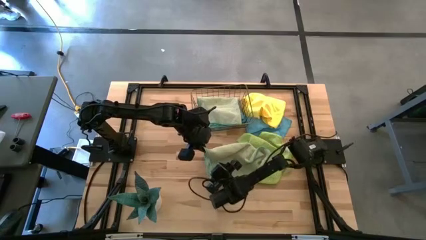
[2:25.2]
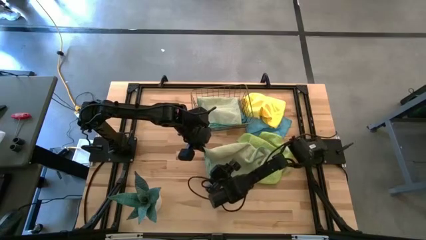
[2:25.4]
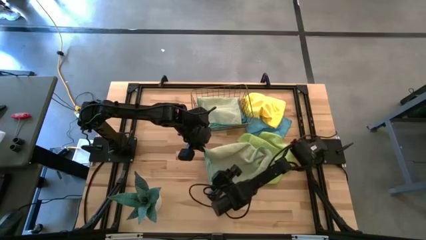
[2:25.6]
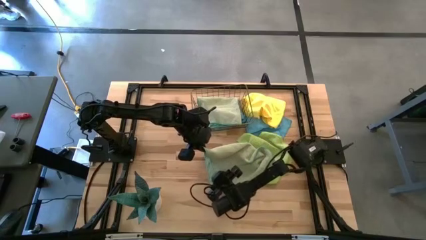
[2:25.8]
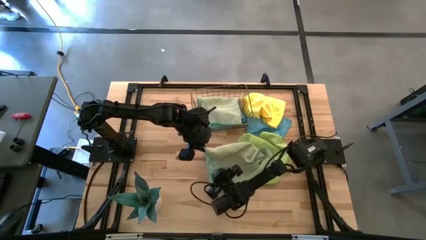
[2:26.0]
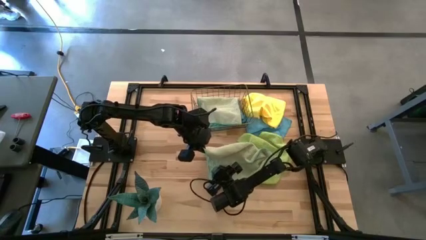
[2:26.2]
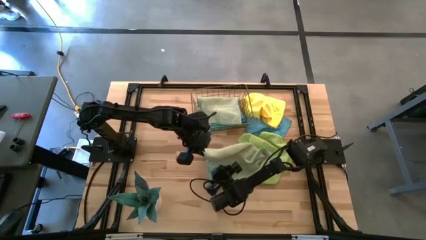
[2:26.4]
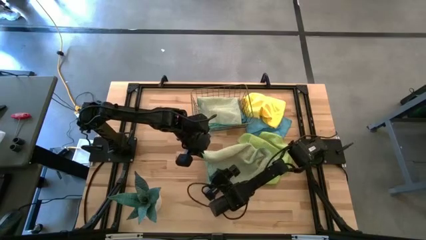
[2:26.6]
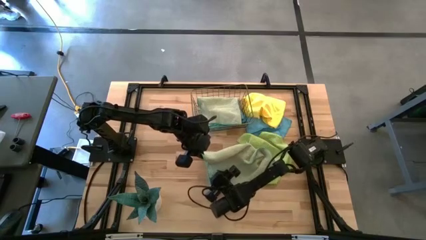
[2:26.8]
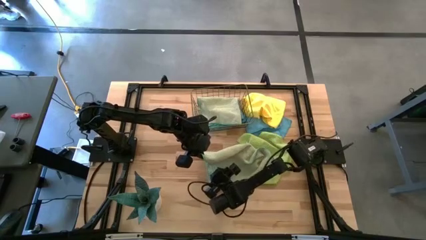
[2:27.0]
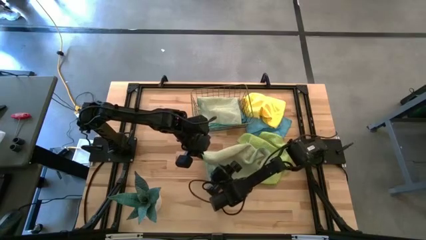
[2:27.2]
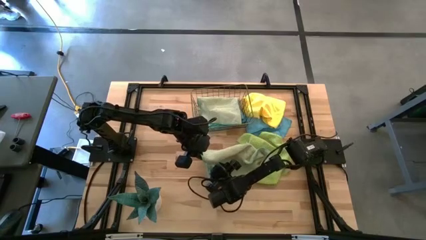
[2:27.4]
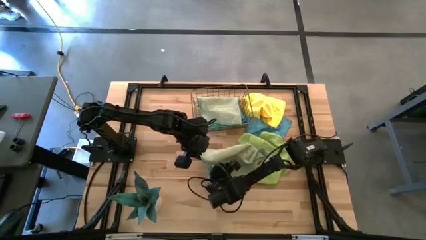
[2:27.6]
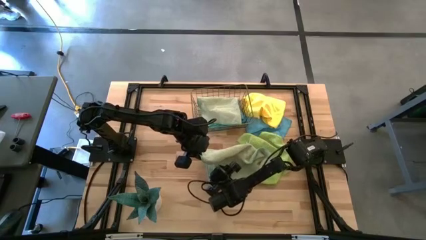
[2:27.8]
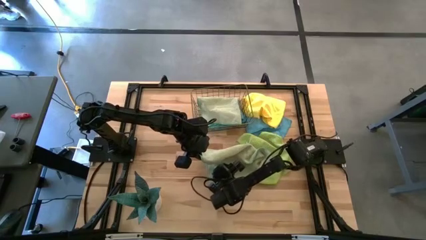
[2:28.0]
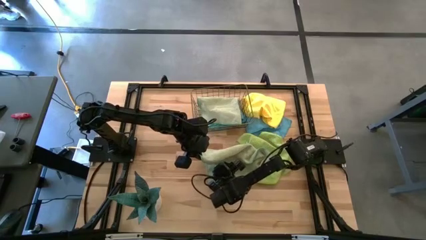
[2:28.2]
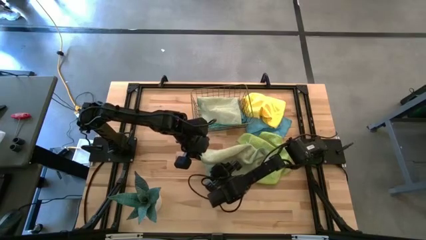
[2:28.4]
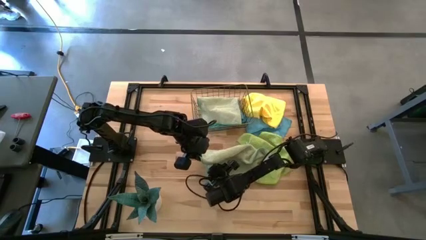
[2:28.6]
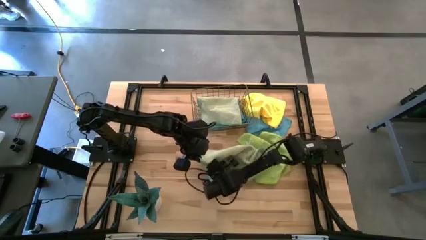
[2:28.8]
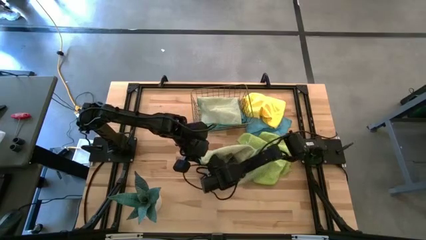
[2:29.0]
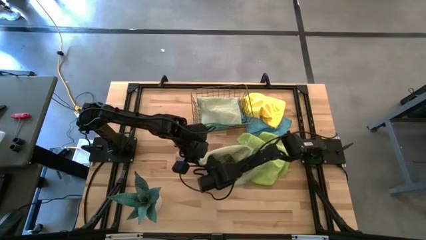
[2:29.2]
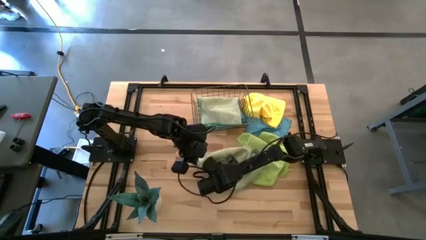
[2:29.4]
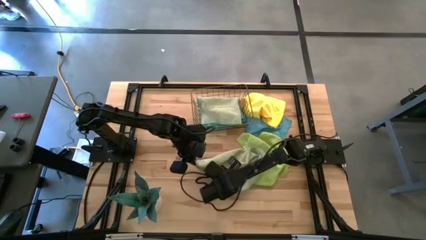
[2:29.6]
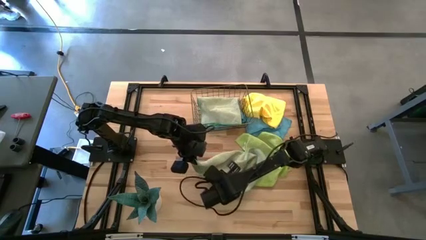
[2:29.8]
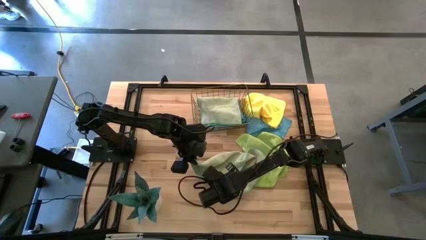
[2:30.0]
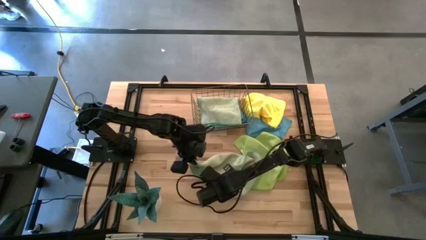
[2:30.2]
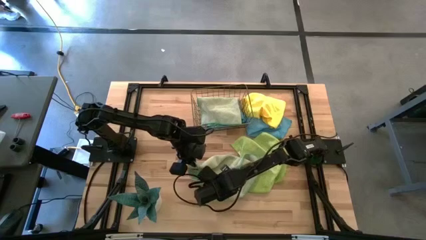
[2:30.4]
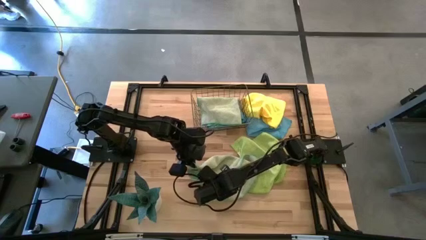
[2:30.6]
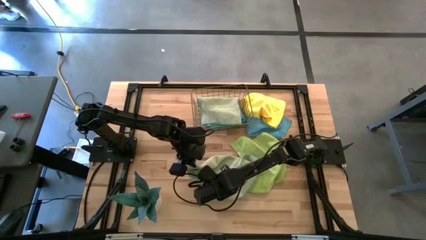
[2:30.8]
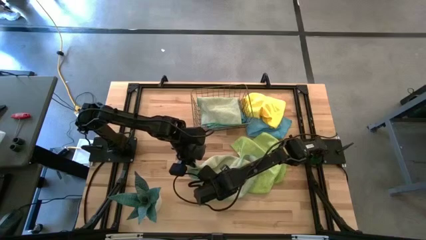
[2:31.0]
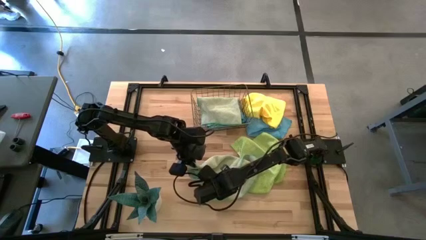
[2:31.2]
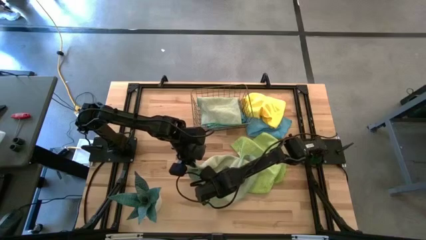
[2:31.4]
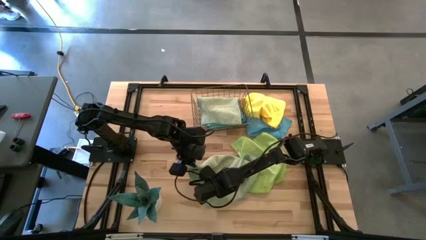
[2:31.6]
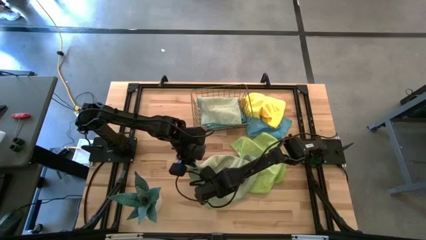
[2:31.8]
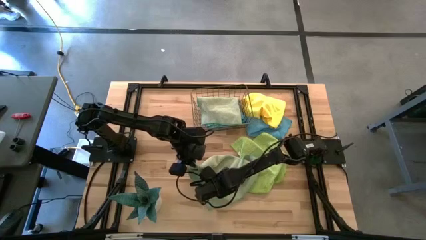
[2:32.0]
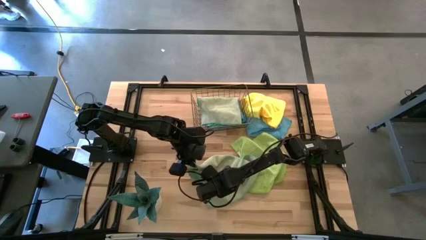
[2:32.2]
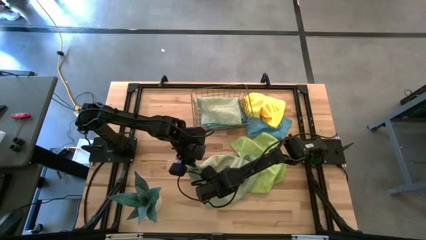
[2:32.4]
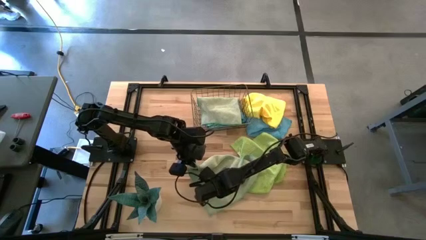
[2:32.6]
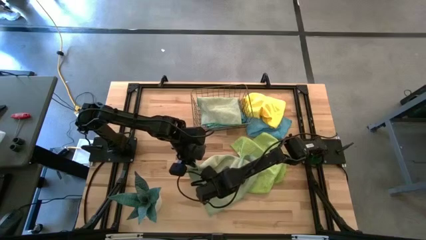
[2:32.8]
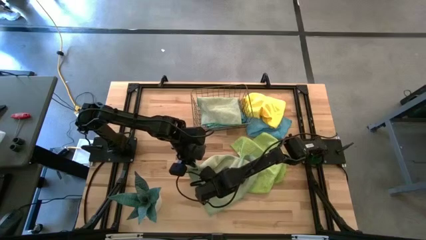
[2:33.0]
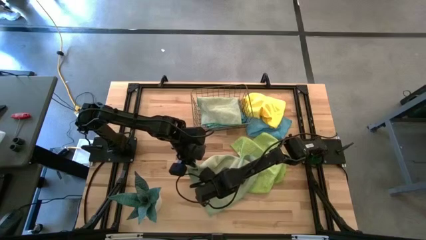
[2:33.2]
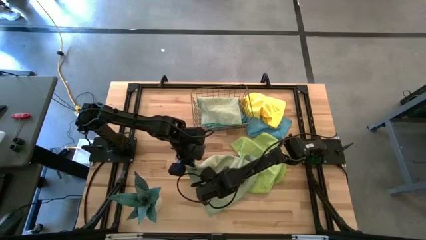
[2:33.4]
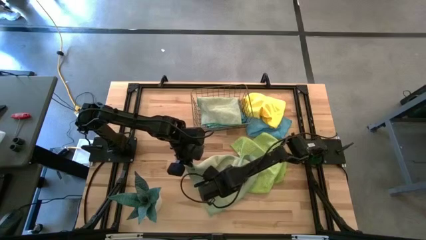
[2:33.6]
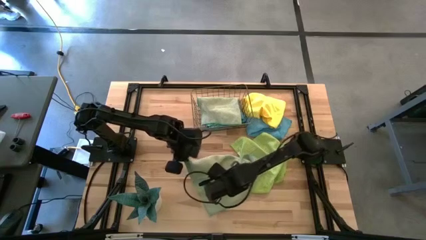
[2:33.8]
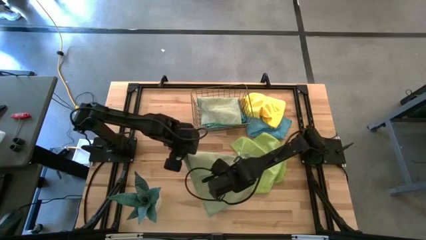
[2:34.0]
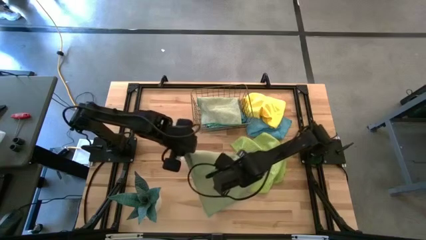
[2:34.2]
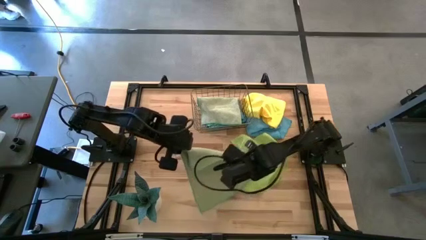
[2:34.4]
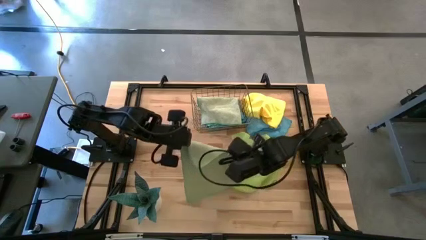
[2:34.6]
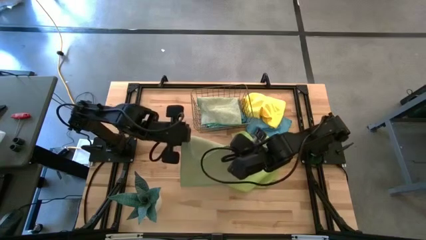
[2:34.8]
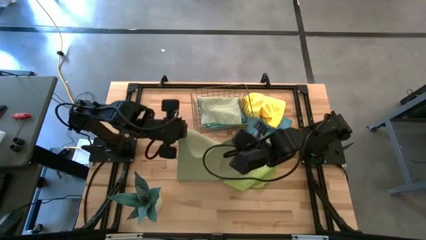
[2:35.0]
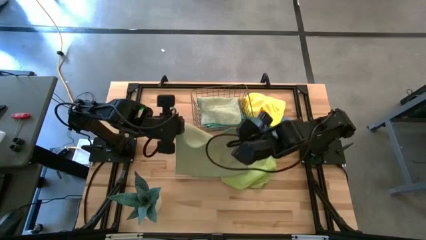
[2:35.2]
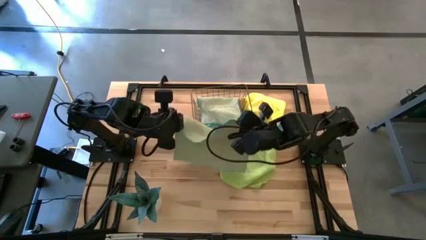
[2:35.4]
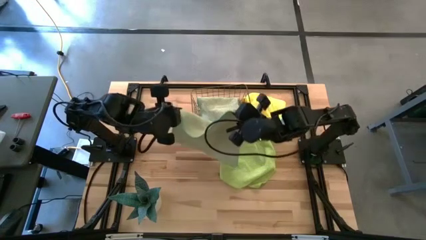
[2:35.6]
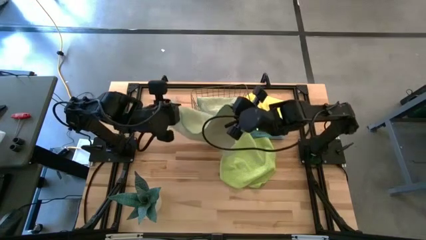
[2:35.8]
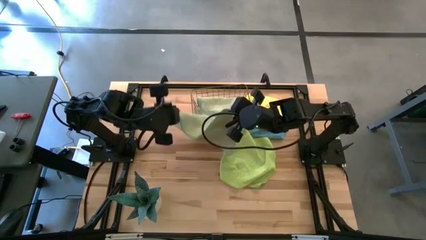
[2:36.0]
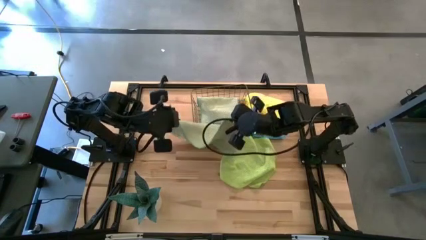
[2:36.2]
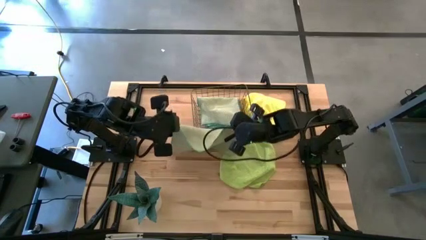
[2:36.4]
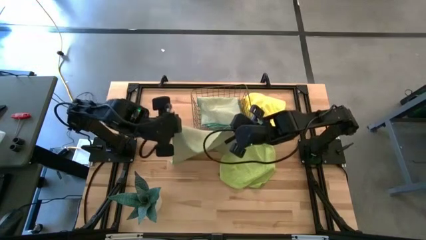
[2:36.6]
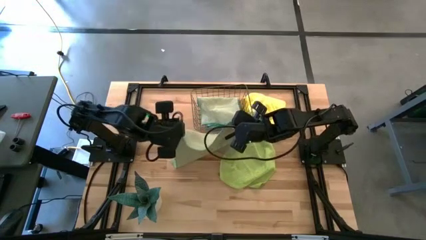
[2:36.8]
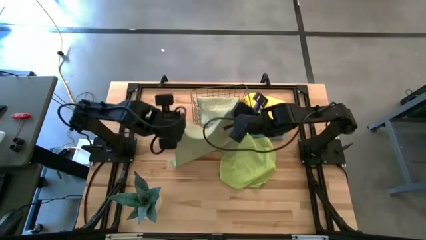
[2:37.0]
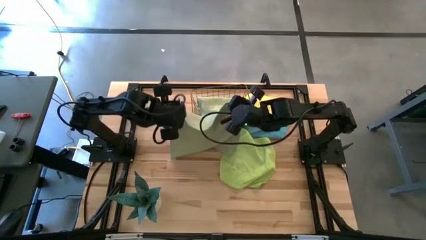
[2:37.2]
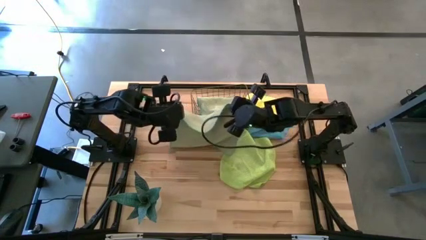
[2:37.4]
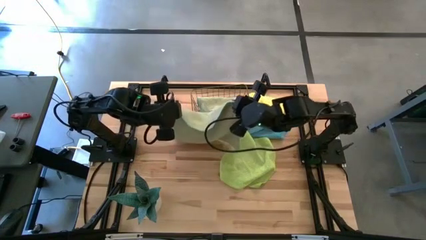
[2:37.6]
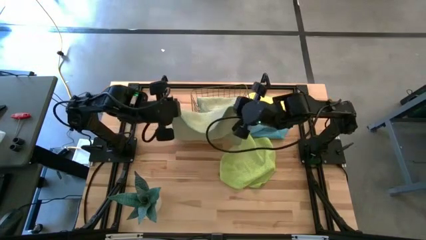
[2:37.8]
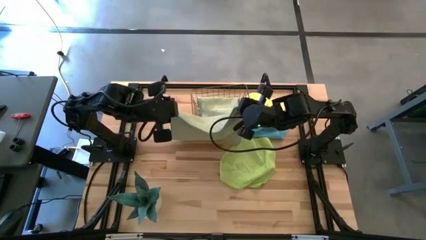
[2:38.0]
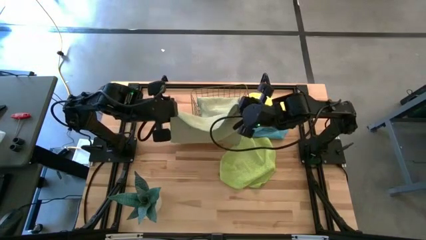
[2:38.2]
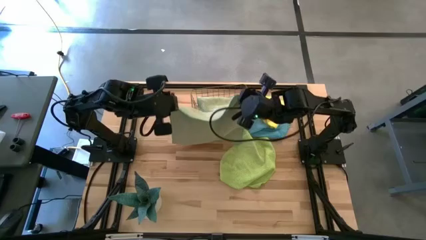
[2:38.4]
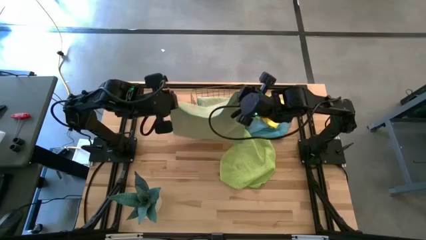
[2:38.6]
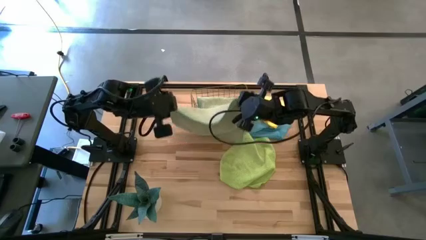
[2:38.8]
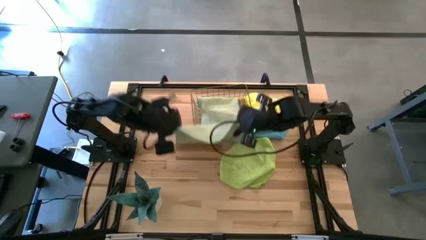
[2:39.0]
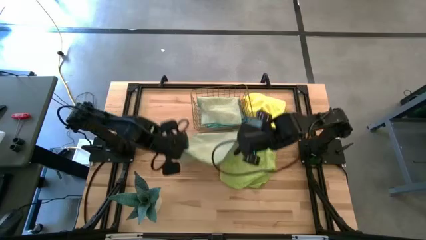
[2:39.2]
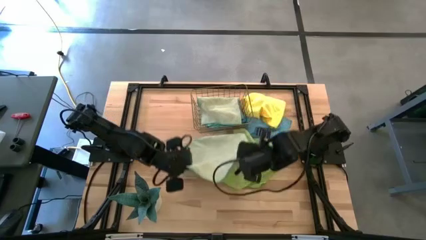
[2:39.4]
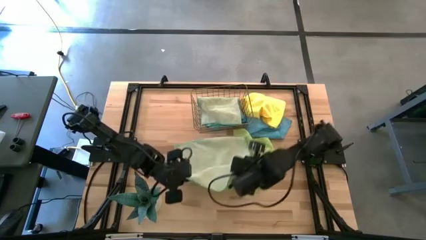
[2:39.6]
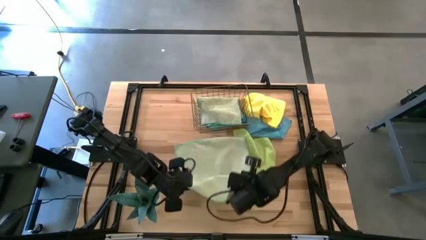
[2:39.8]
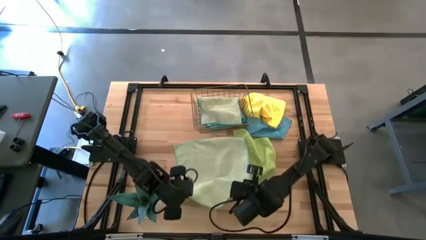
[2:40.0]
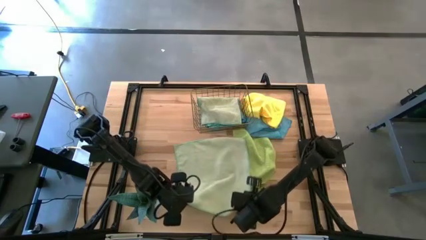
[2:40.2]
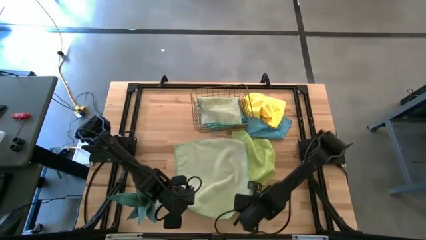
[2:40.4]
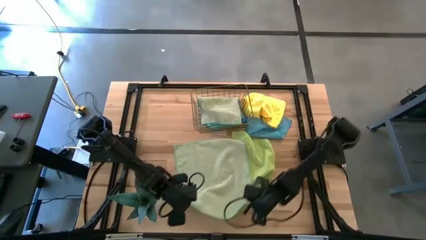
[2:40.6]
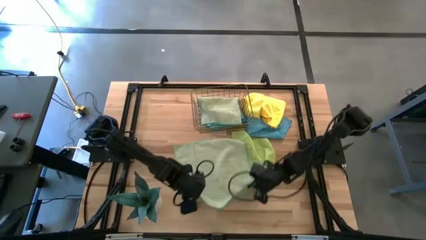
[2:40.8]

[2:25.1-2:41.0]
Task: Fold microfiber towels
Fold the light green towel
